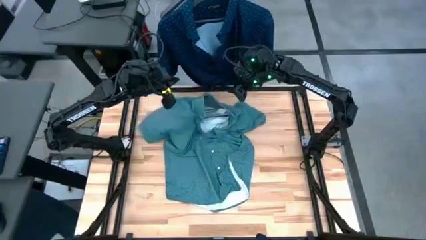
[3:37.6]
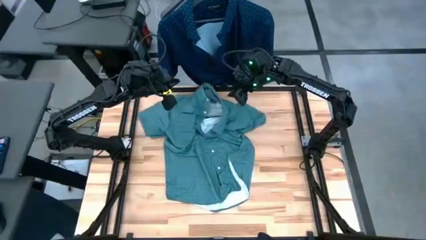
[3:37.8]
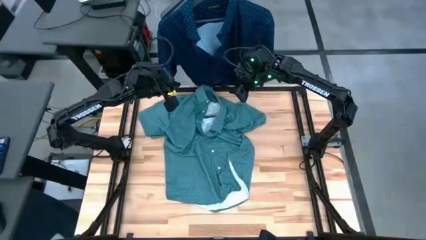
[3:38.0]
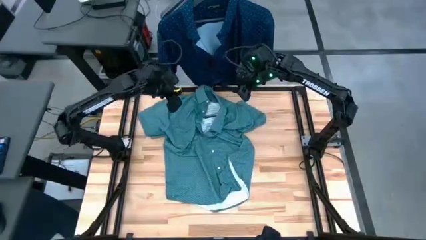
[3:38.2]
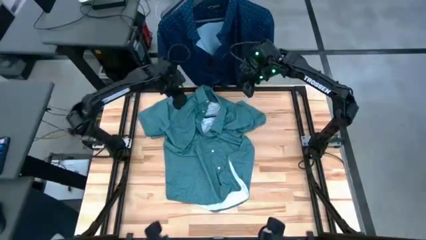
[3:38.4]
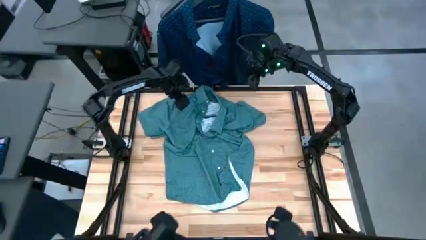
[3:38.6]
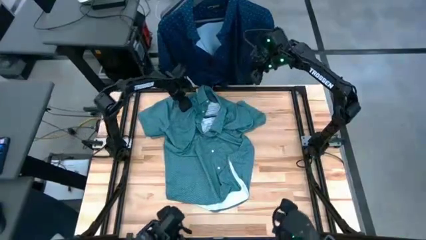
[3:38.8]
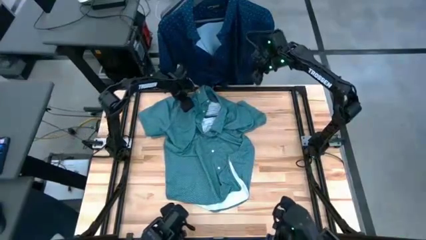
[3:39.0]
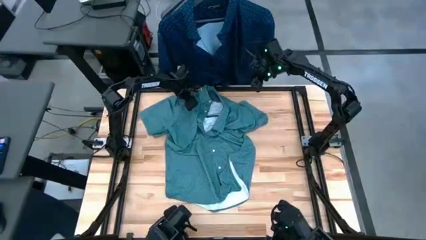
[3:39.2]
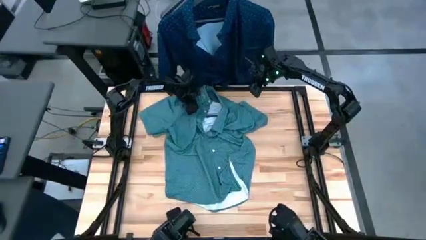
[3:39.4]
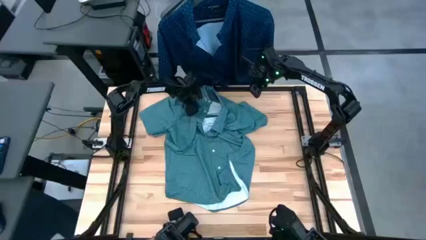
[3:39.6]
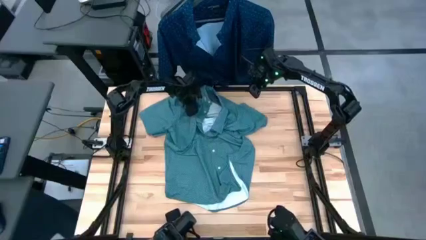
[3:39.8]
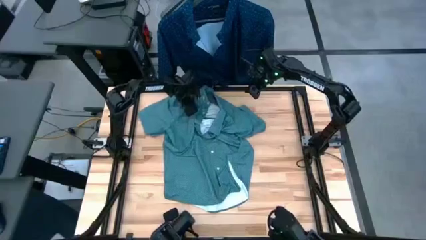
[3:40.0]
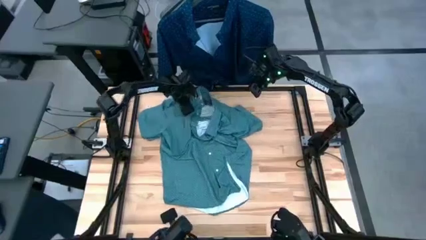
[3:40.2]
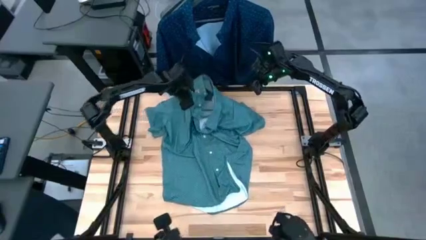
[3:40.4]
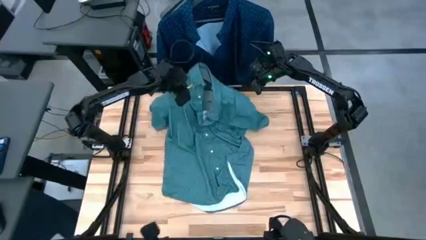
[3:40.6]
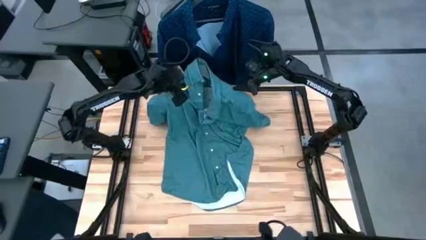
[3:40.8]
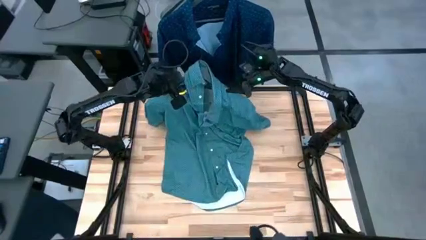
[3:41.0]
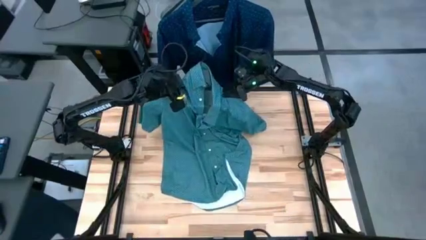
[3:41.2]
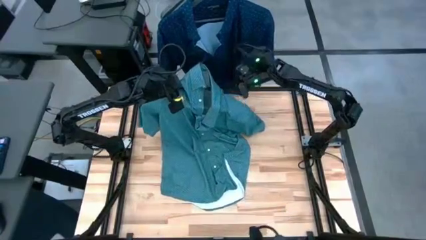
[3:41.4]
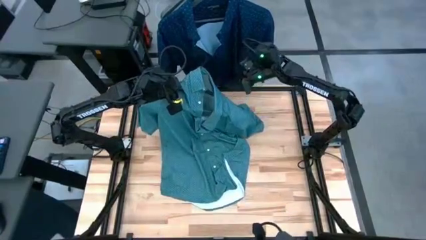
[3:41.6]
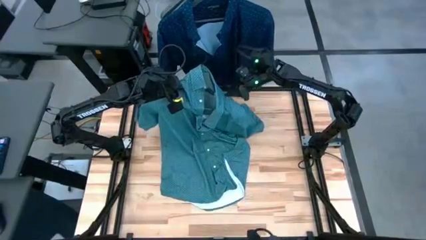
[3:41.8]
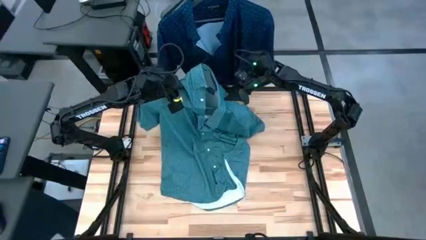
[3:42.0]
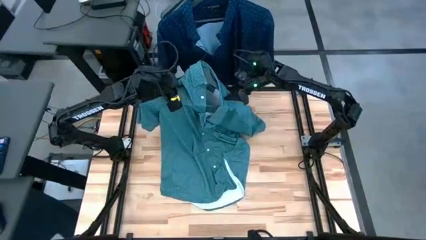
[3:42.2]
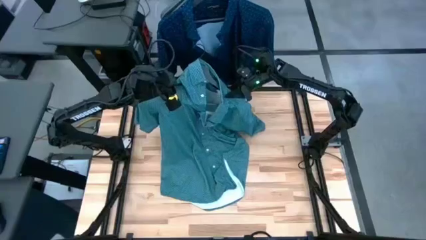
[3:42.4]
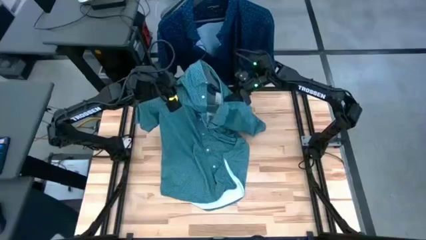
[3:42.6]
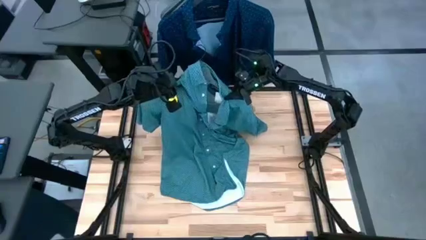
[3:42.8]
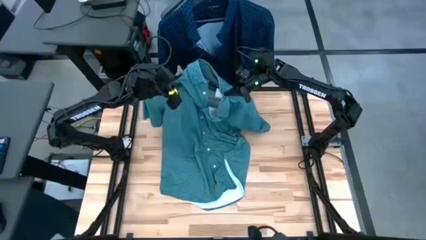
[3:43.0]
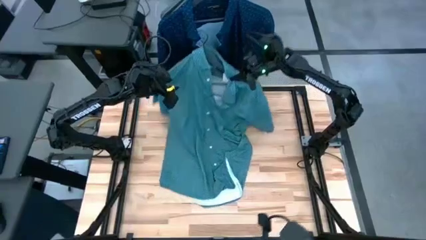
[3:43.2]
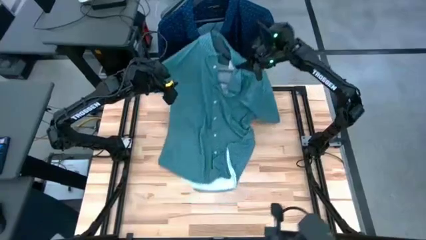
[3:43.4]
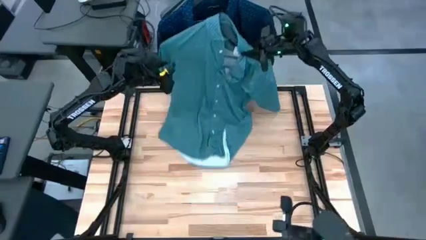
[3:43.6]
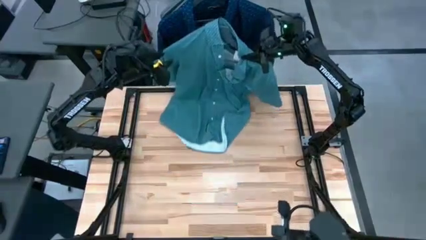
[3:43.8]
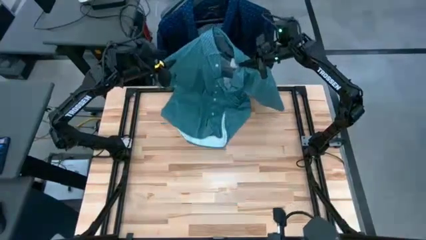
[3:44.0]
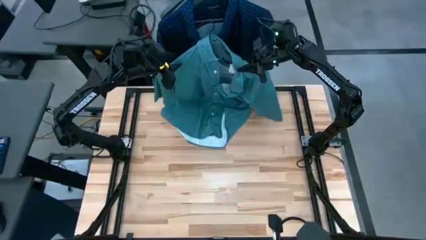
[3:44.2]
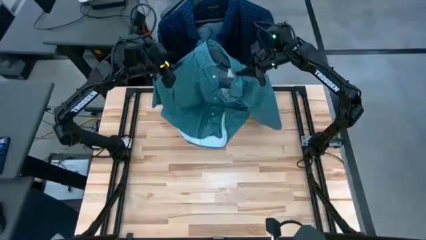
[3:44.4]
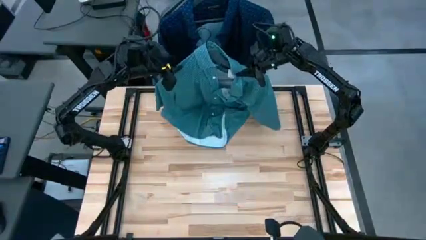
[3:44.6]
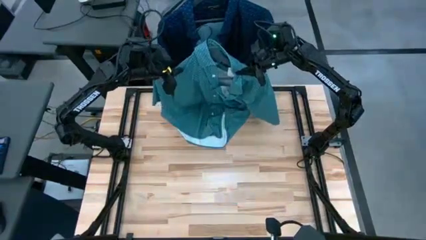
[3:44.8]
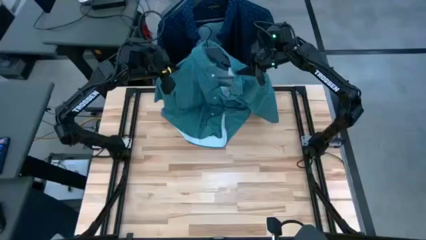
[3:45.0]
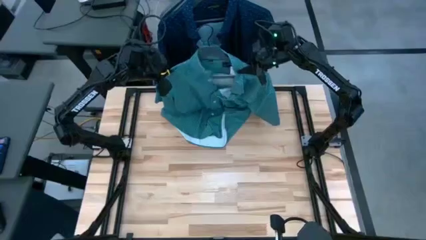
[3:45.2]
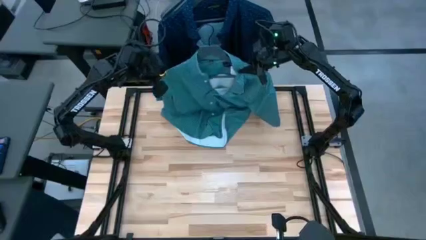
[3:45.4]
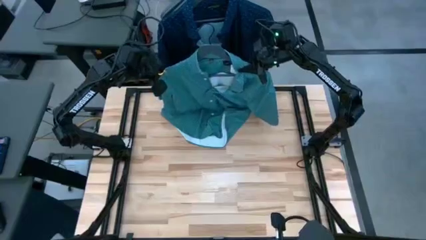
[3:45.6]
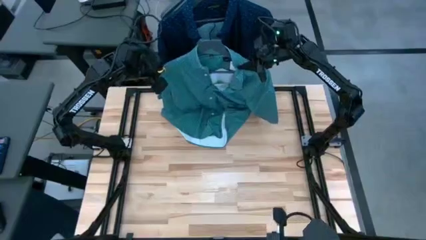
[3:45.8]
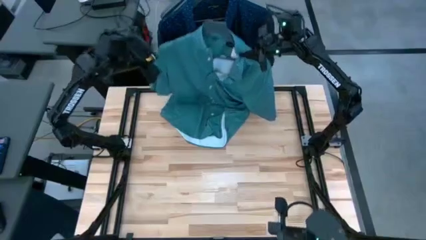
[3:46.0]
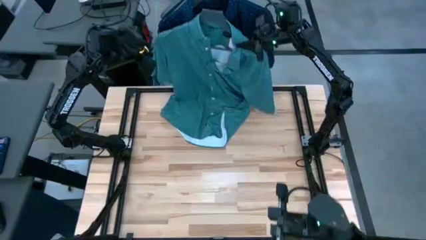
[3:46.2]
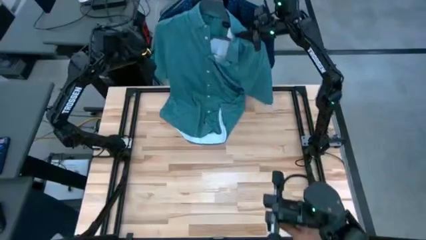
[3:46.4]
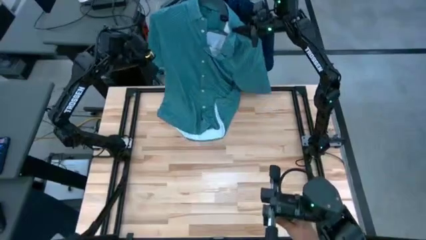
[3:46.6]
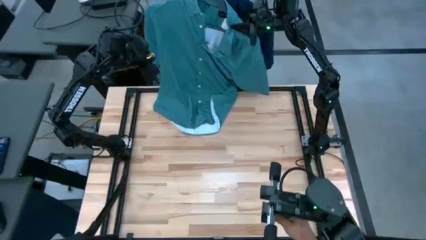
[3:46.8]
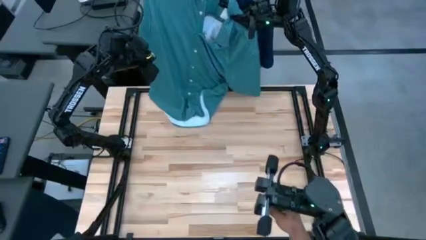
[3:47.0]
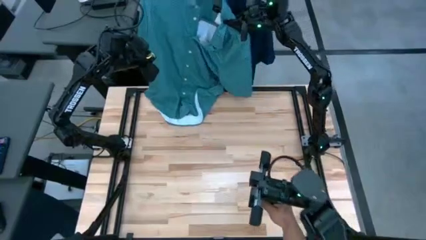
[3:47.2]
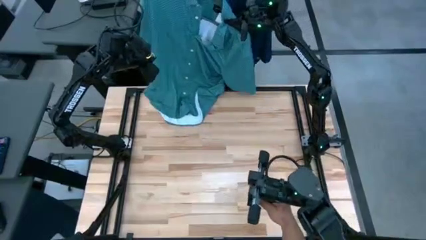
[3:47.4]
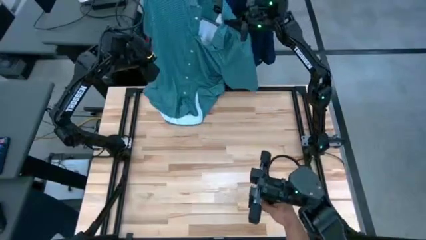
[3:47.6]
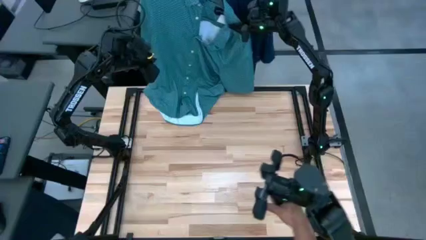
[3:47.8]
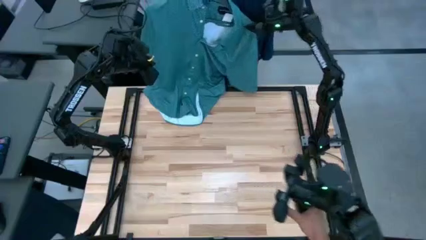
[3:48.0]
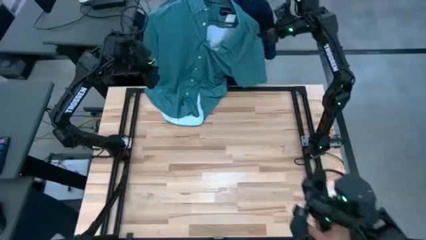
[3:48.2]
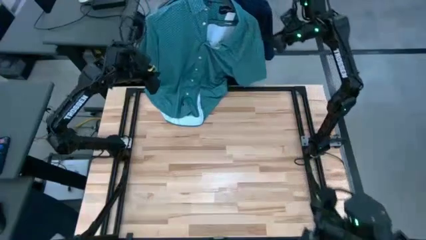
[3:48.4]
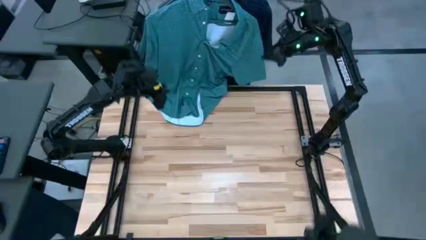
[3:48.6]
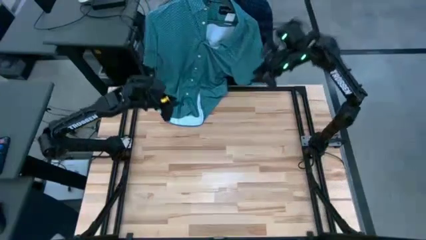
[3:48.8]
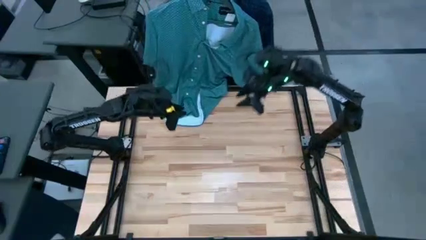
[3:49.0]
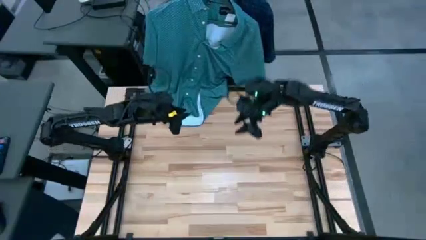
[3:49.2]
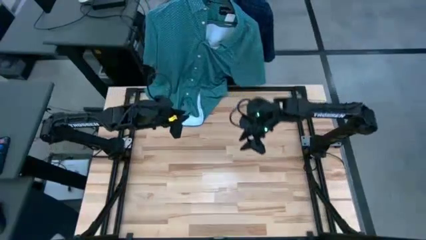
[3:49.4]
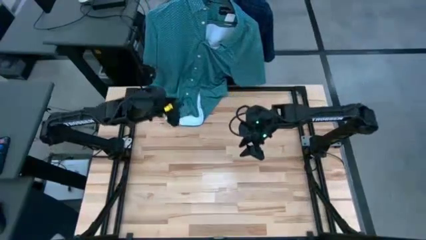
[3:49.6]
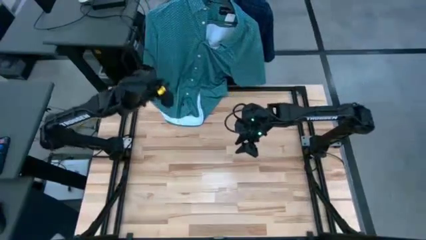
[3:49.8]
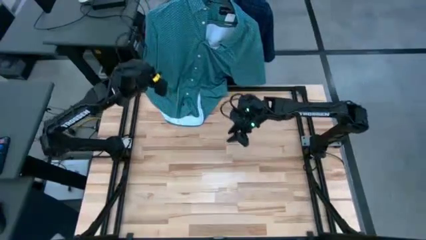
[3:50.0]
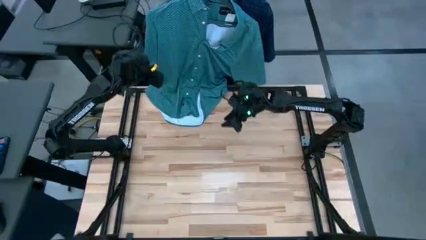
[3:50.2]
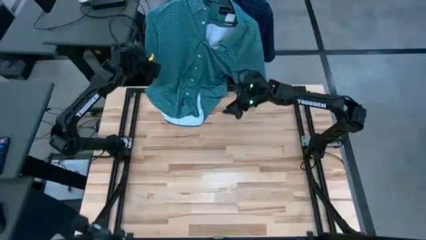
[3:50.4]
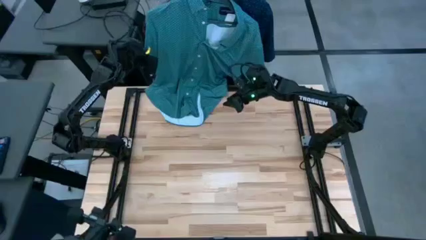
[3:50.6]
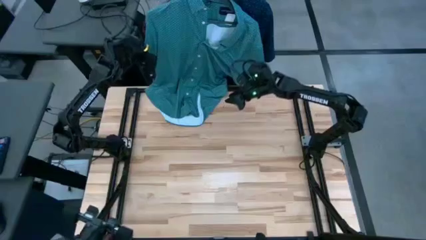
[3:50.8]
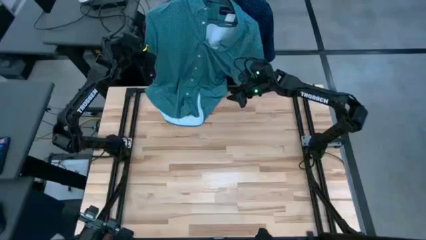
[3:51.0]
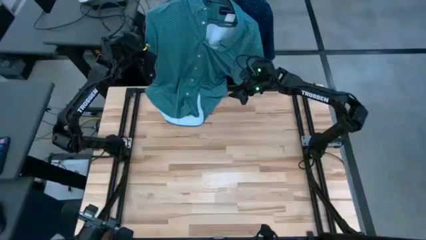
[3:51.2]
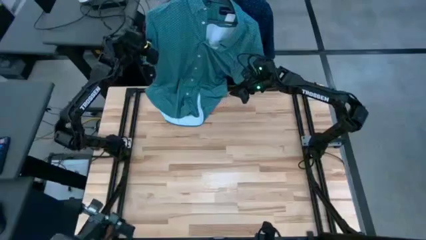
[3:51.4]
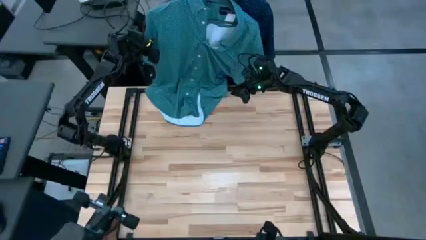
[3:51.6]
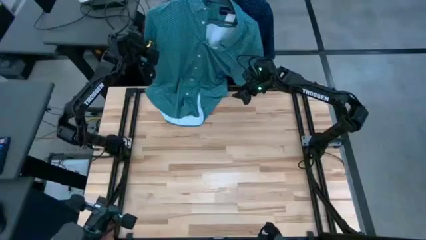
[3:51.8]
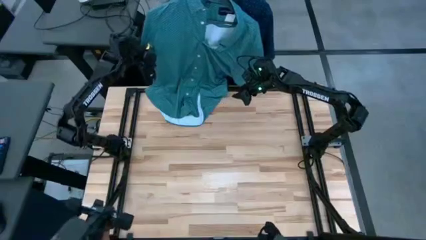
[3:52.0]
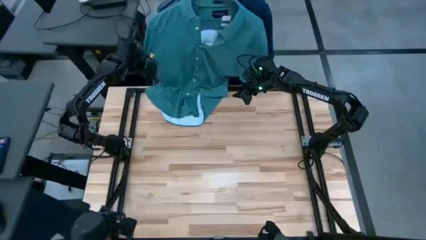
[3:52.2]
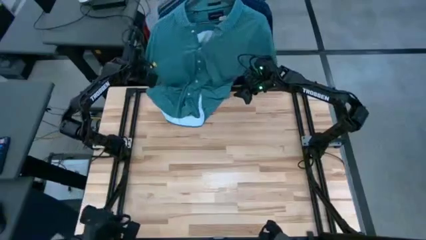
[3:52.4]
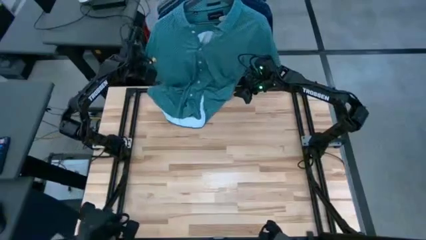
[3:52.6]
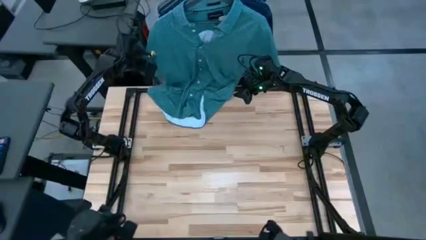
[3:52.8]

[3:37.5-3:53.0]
Task: Hang clothes
Hang the green polo shirt on the rack

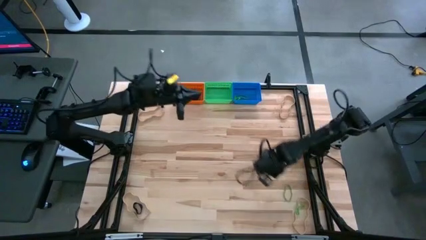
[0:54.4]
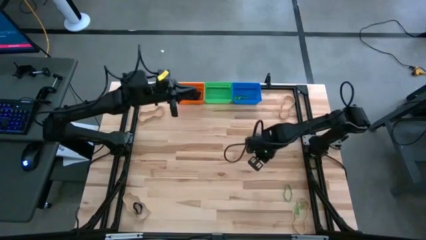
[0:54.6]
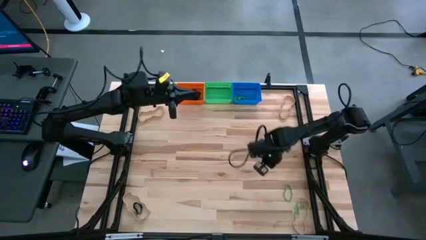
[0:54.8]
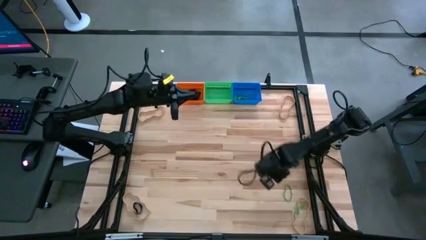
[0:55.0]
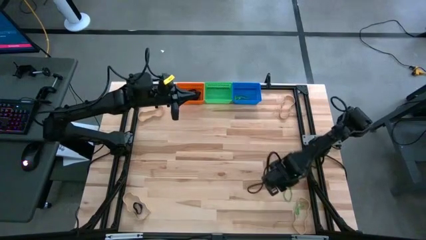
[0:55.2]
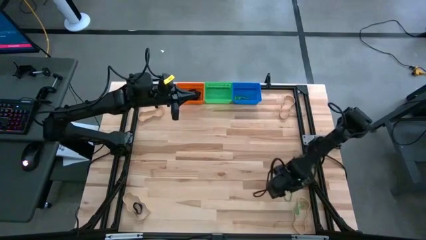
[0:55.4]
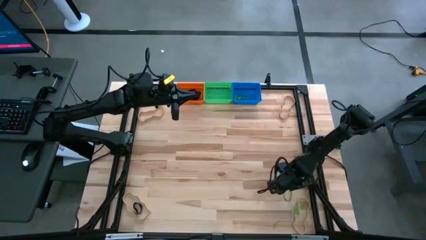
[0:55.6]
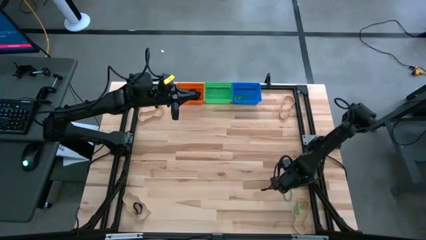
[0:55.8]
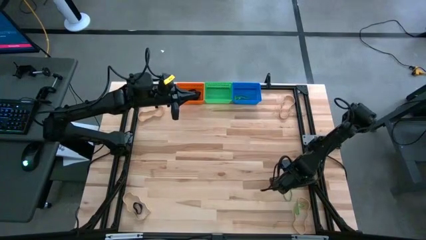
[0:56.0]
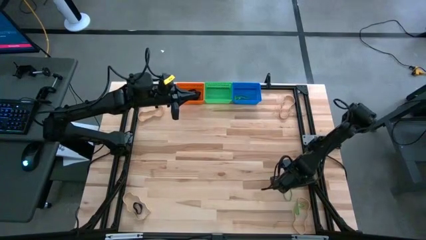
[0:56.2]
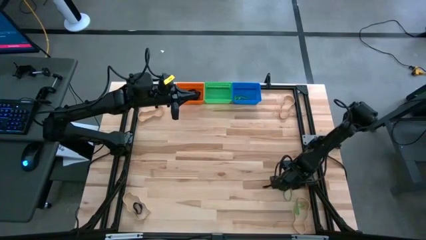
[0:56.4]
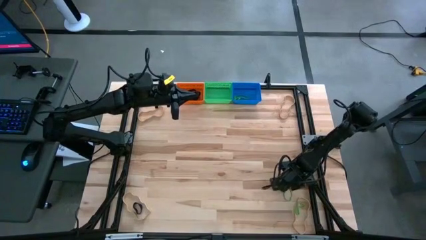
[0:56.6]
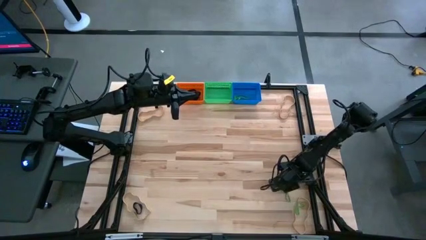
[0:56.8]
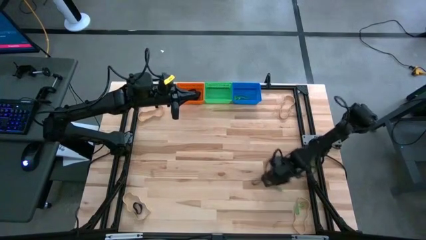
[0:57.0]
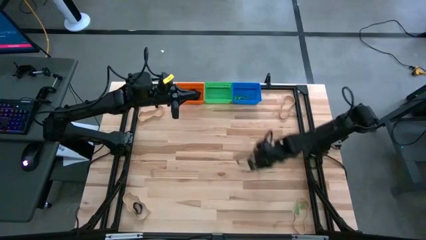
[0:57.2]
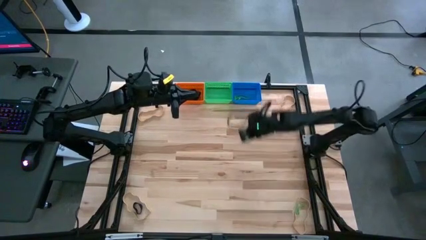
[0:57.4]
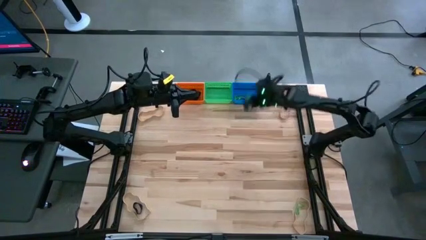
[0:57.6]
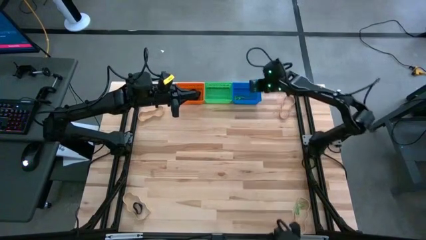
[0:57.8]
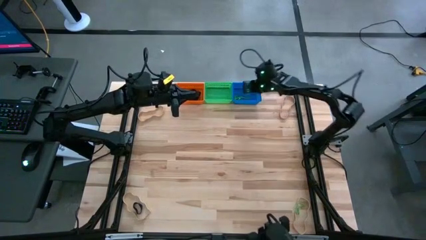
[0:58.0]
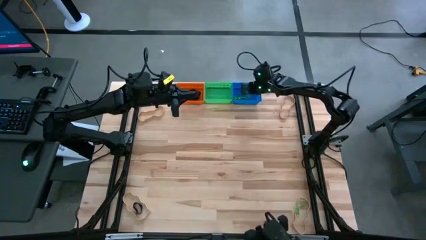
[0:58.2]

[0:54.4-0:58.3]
Task: Sort rubber bands into baskets
Put the green rubber band into the blue basket
